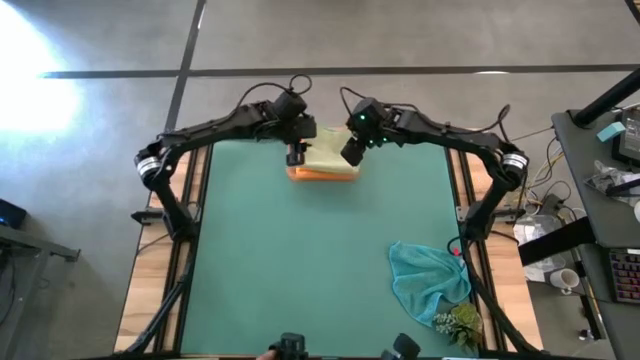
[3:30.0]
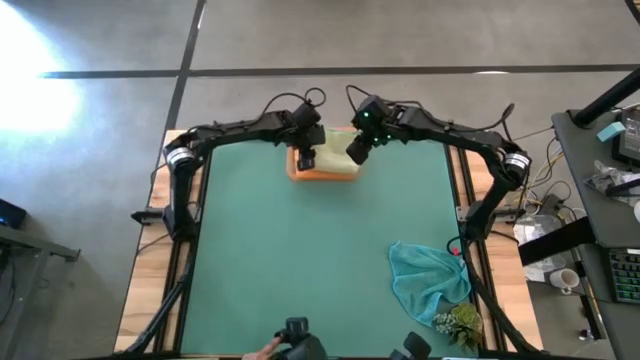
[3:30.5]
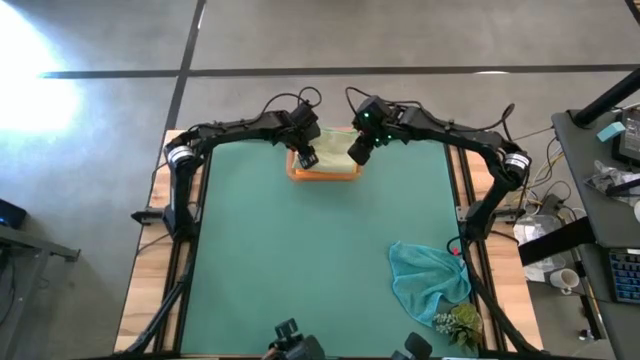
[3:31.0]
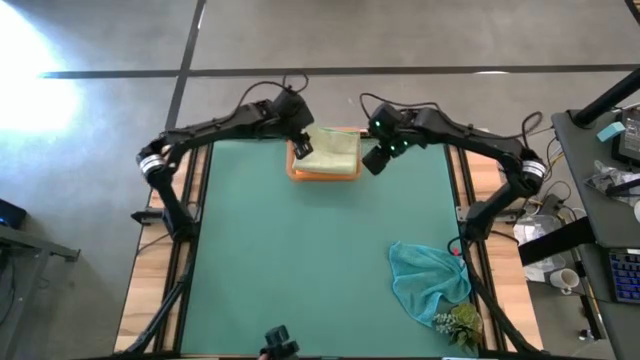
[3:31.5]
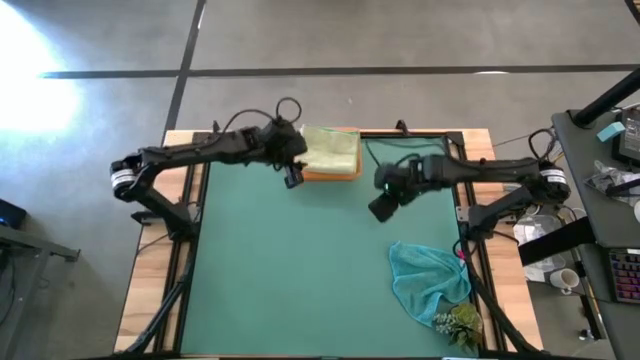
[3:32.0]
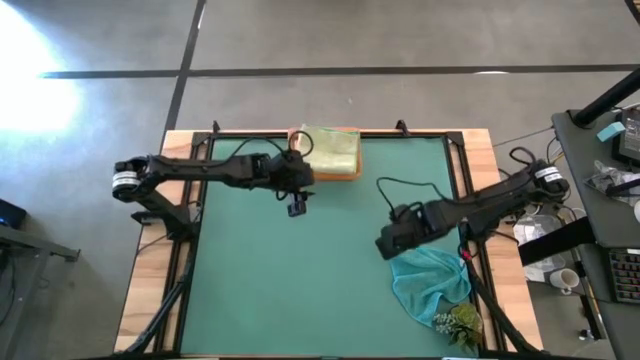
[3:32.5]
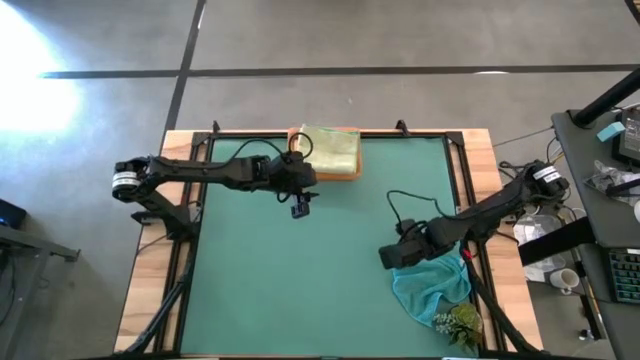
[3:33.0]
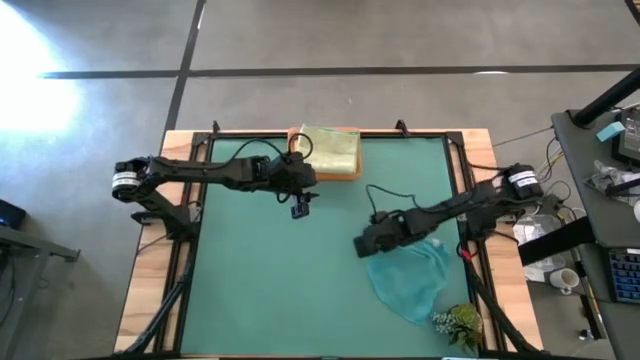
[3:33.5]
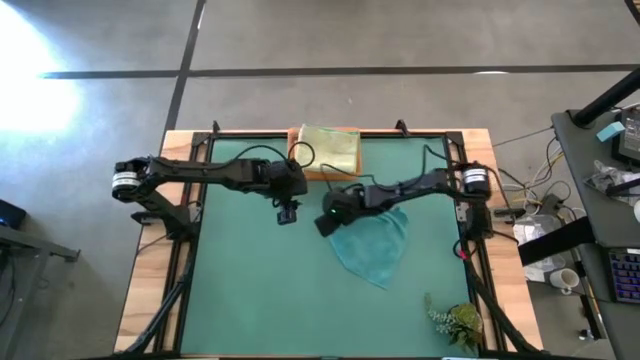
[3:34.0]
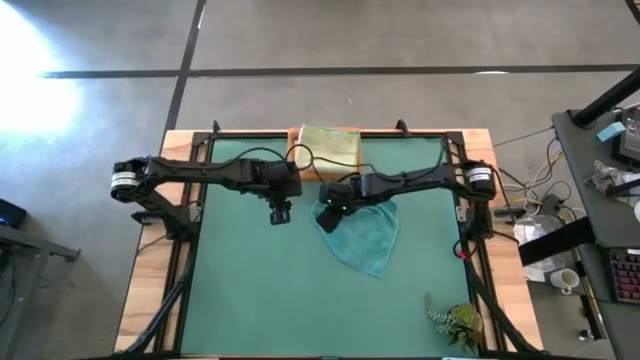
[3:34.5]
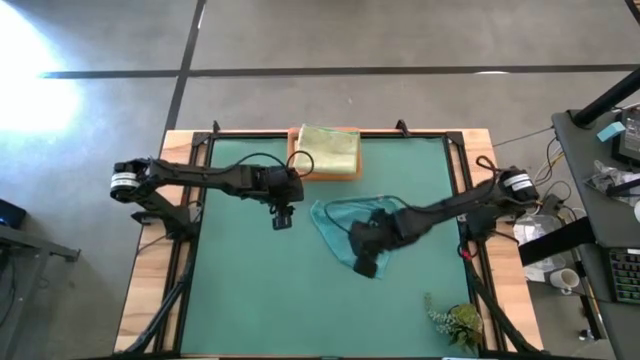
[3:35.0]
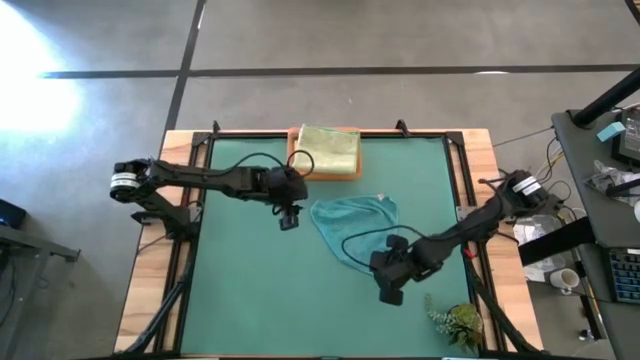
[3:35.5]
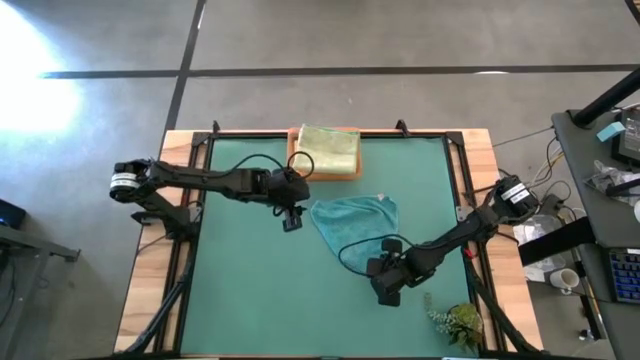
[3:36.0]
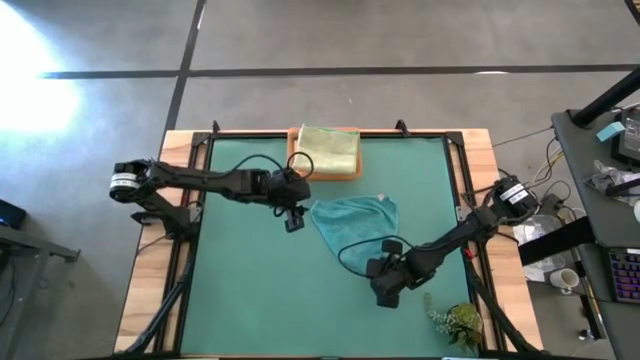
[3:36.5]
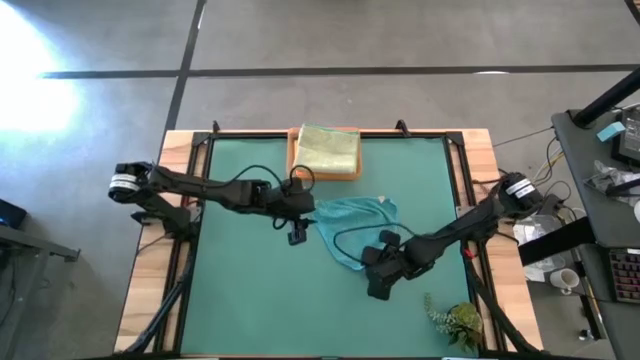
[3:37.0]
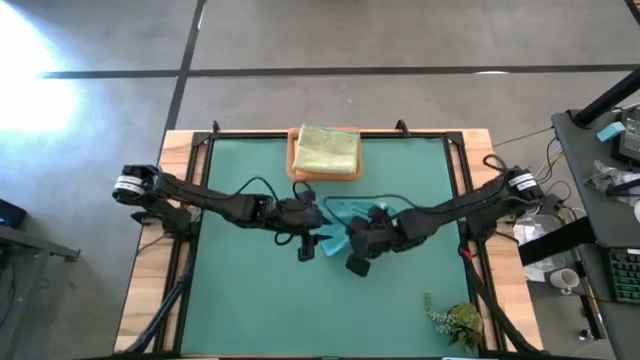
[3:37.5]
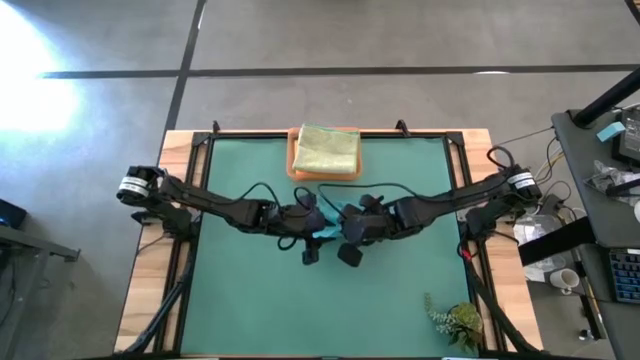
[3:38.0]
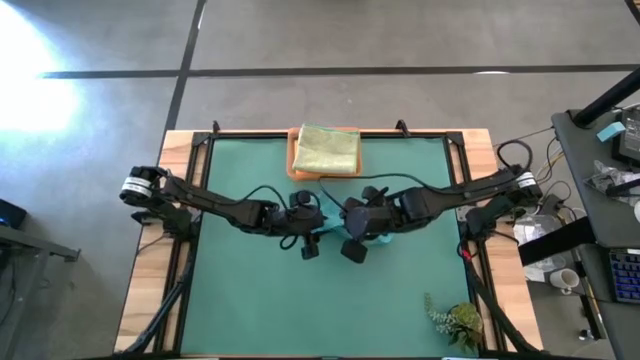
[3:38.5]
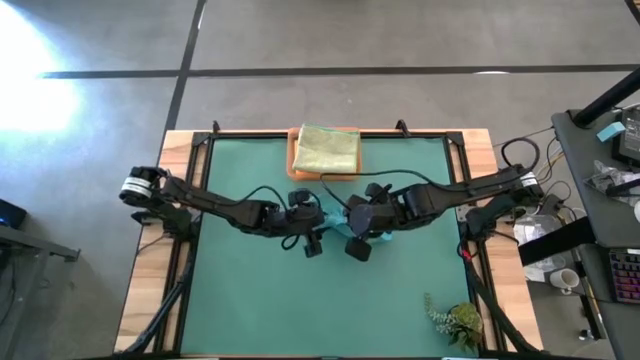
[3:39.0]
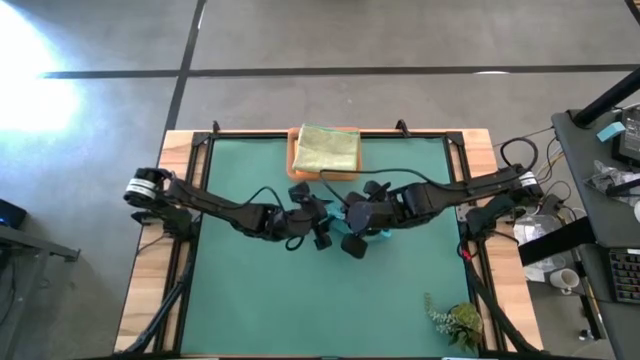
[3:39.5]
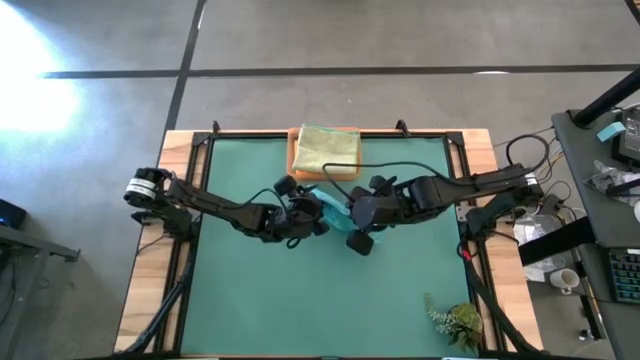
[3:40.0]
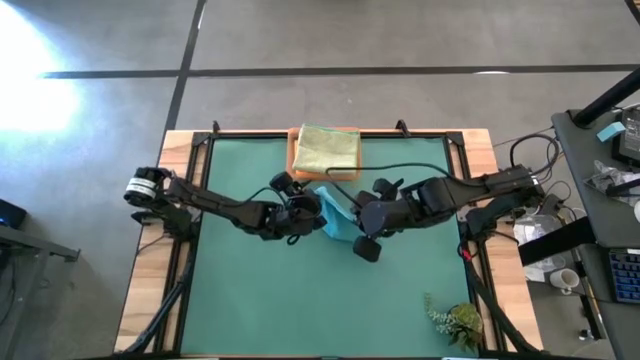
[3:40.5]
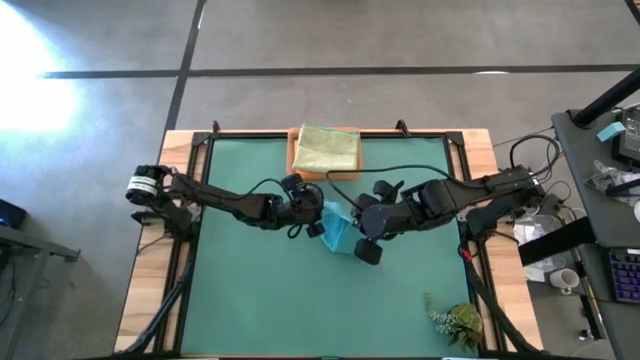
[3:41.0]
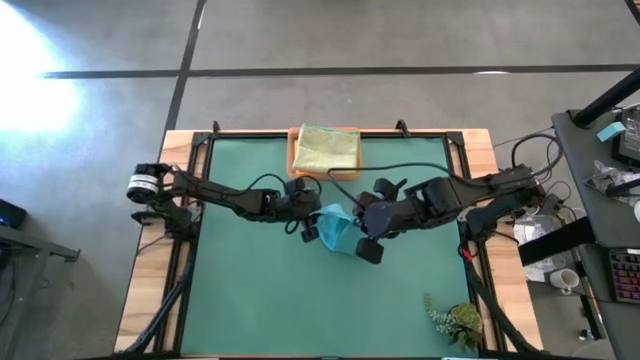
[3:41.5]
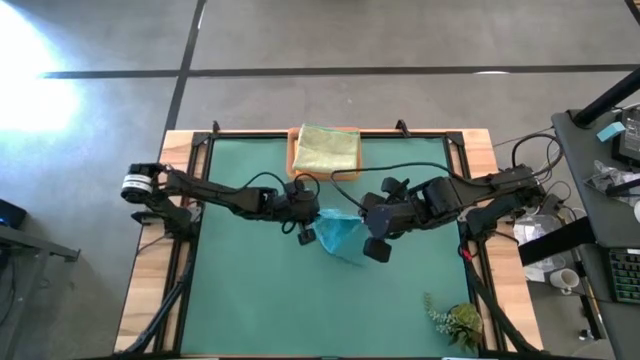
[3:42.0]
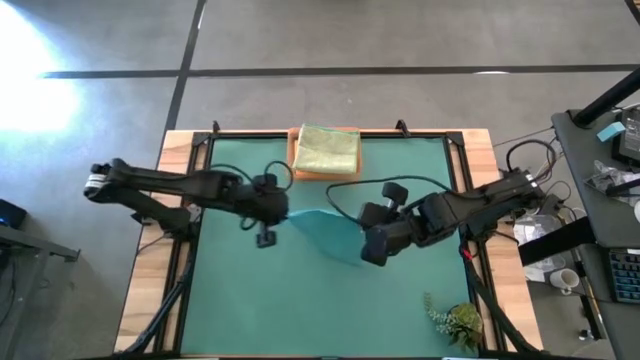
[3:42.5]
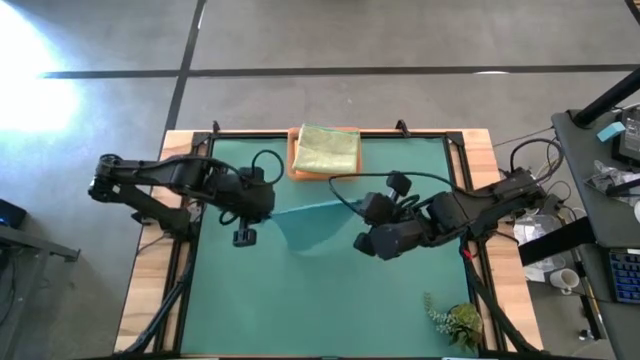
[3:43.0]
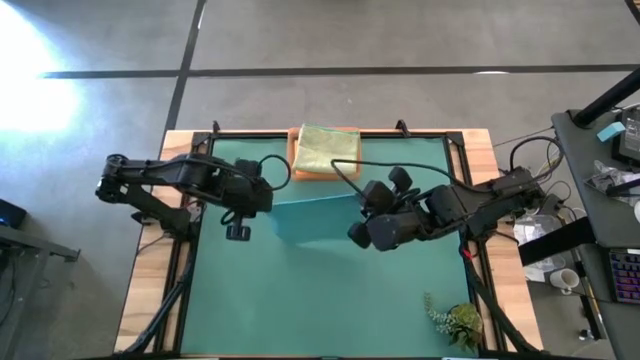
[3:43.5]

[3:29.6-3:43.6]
Task: Fold microfiber towels
Fold the blue towel

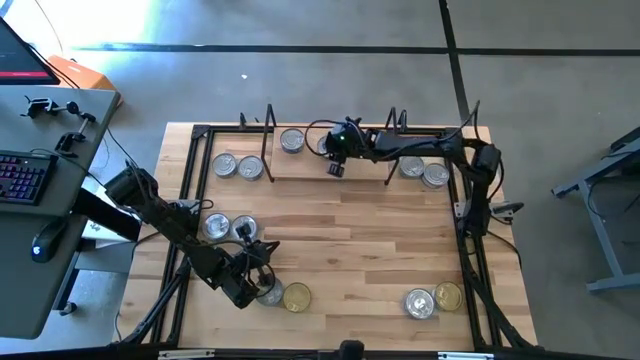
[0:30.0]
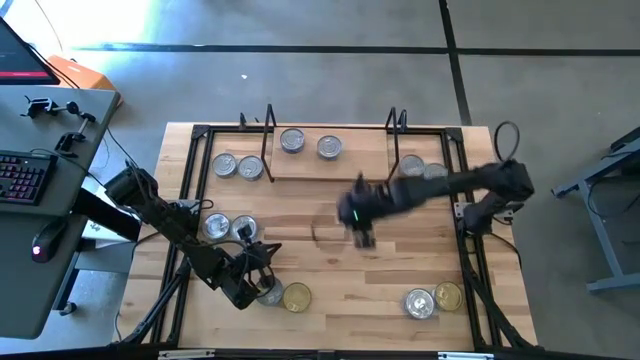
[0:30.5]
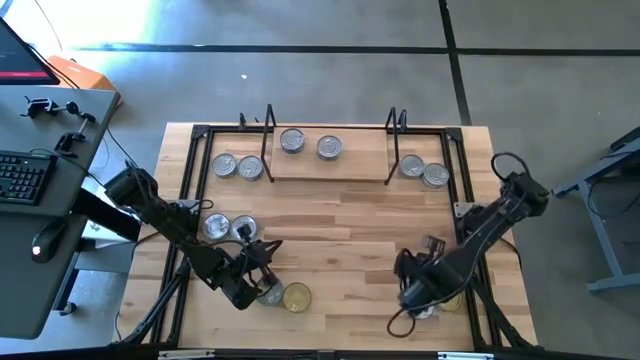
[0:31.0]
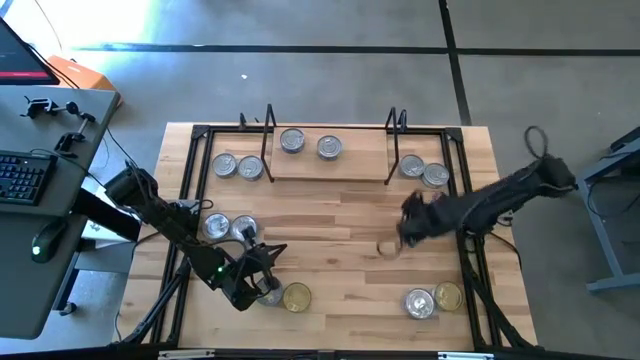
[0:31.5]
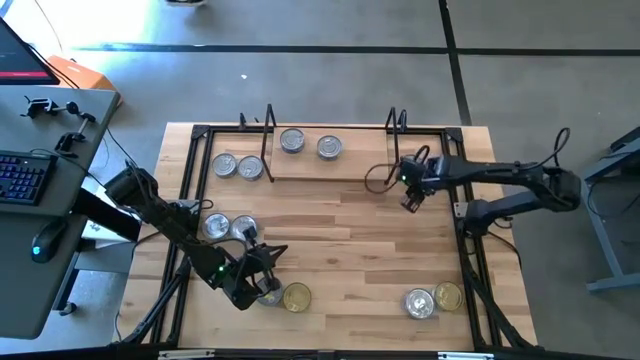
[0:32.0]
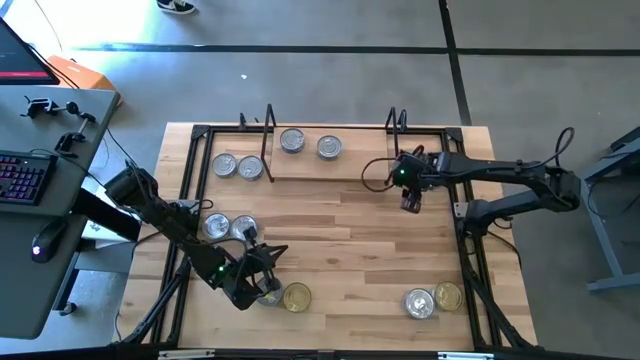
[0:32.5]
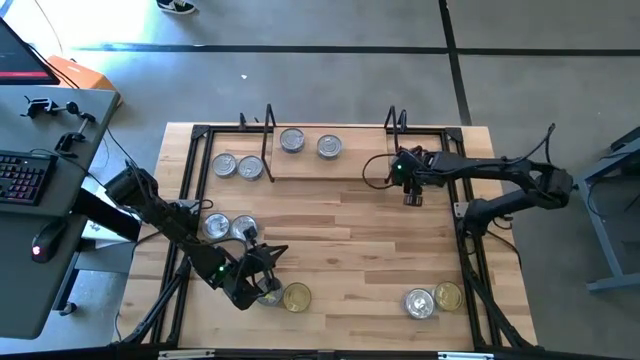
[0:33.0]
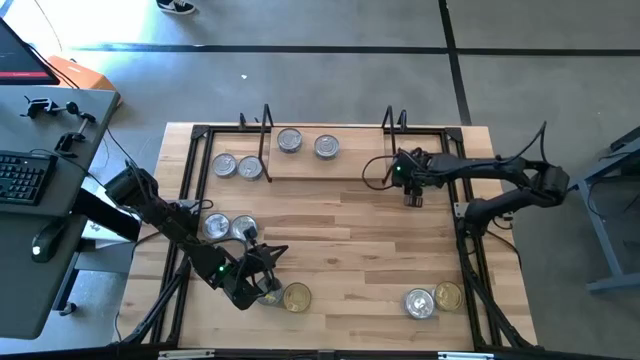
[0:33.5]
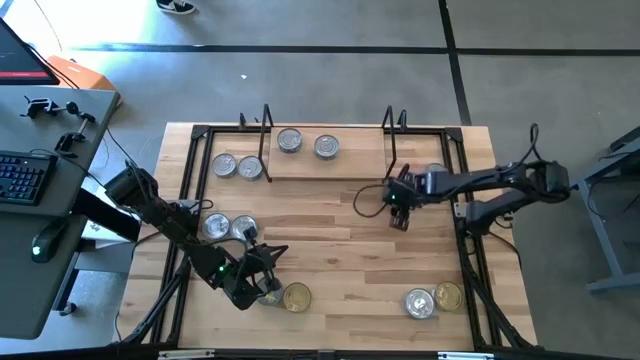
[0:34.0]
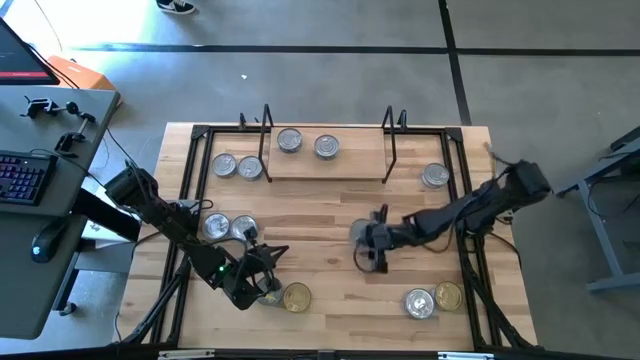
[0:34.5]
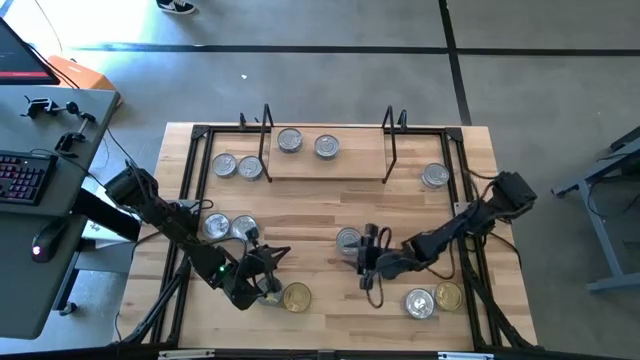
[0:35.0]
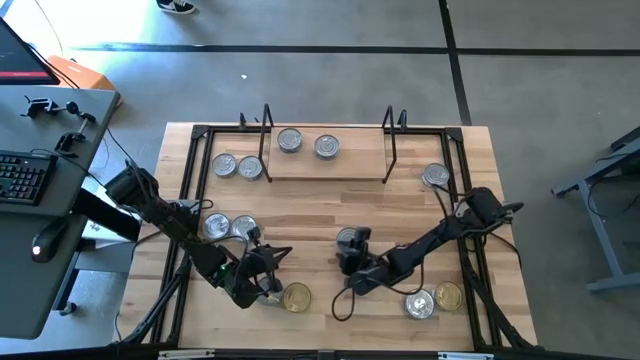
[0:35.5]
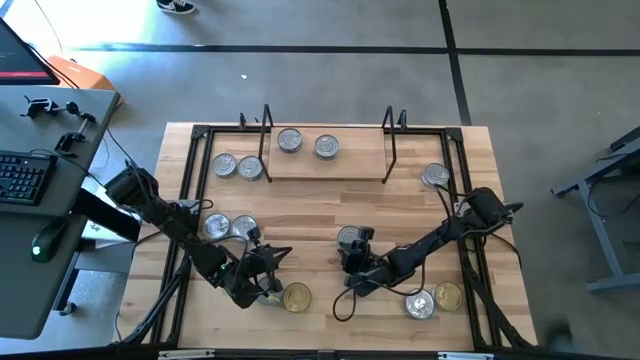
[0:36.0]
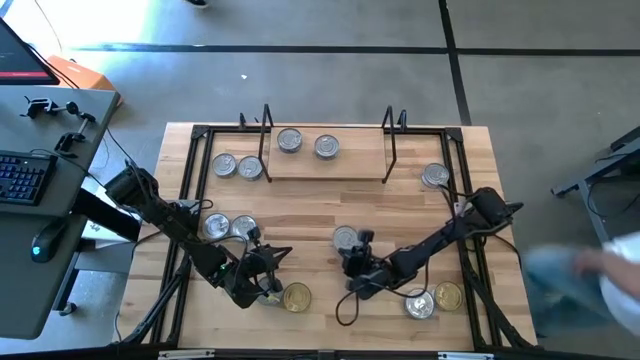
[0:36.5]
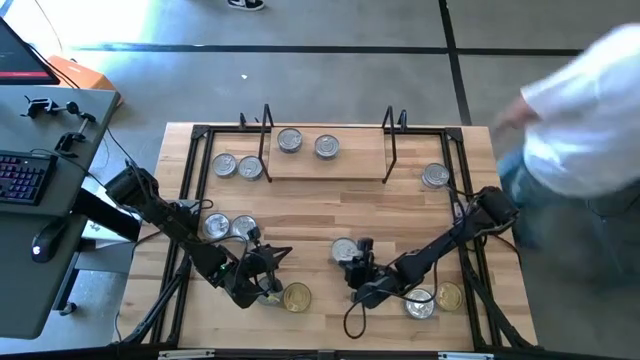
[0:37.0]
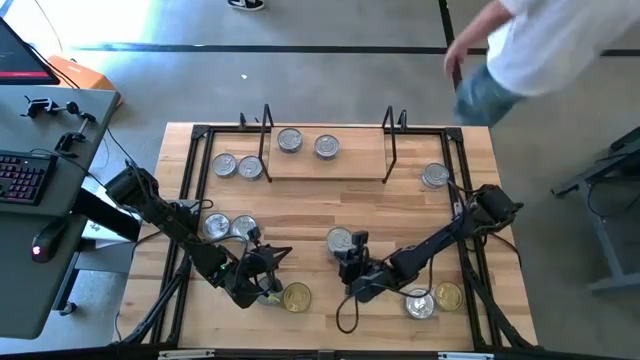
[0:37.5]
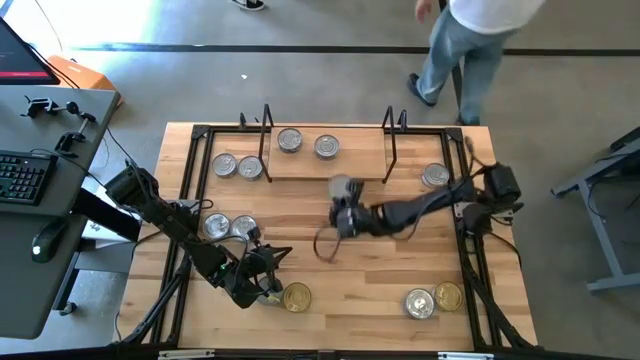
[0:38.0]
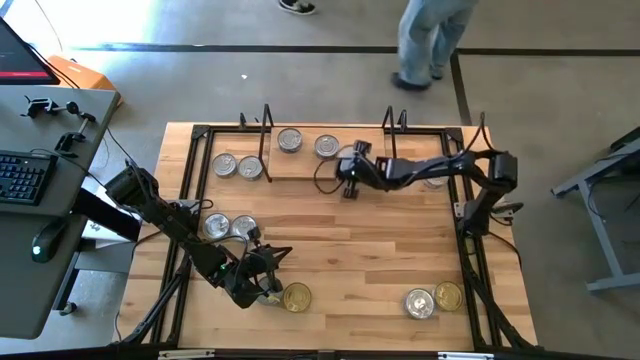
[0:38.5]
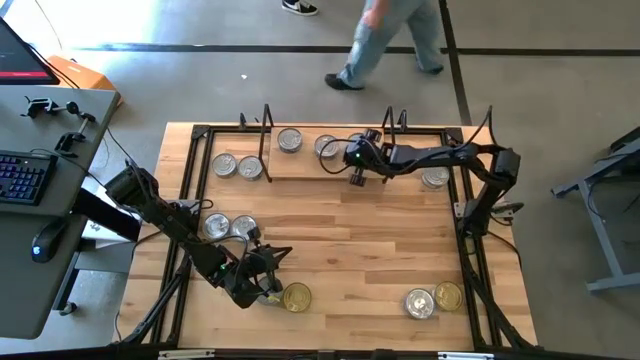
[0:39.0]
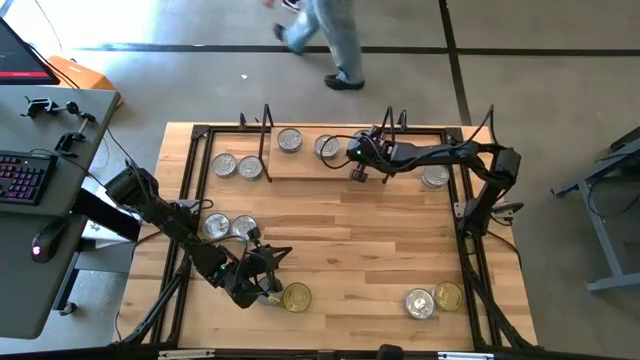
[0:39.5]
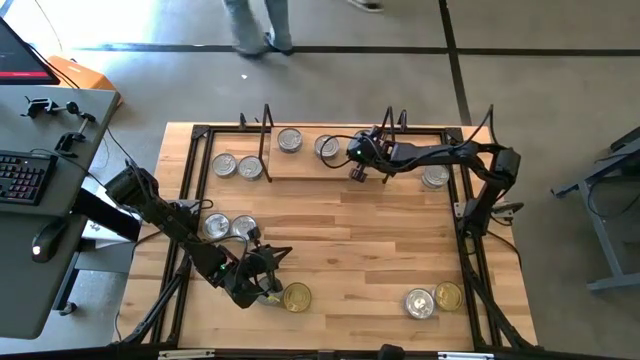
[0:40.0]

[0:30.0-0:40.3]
Task: Stack canned seafood by type on shelf
Put the Green-blue tuna can on the shelf
